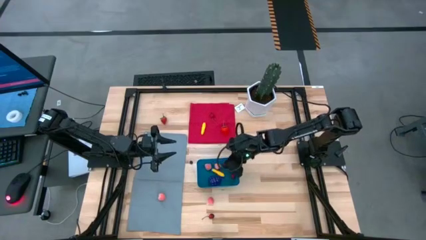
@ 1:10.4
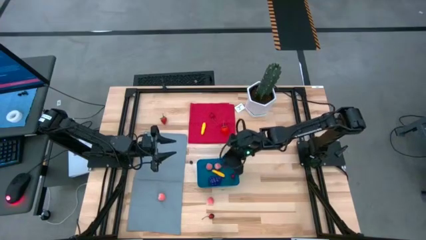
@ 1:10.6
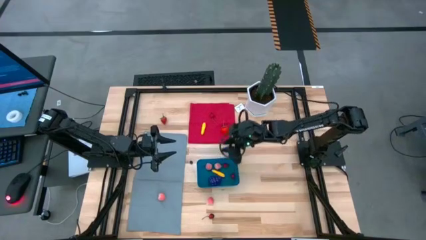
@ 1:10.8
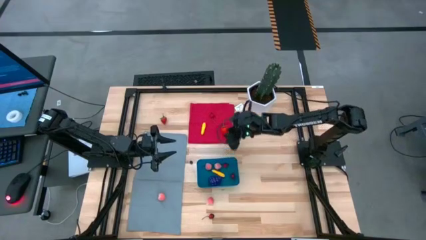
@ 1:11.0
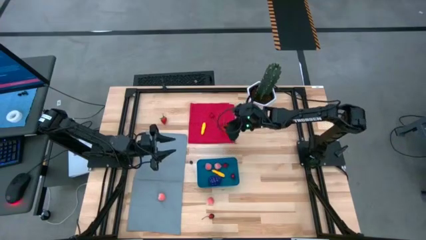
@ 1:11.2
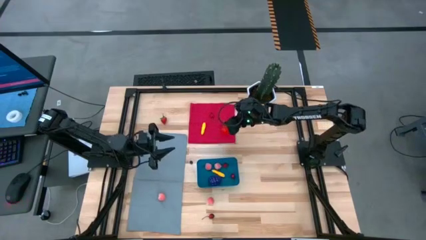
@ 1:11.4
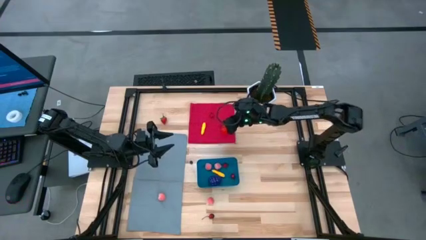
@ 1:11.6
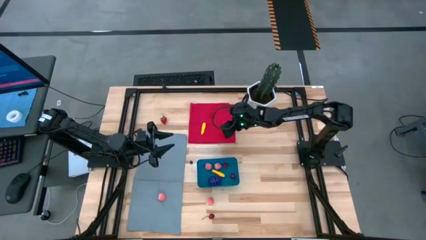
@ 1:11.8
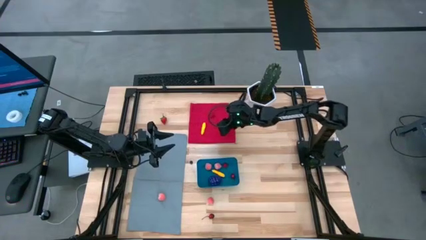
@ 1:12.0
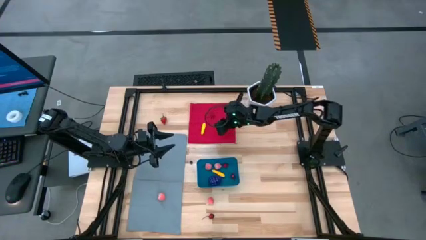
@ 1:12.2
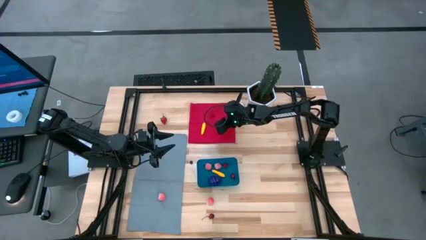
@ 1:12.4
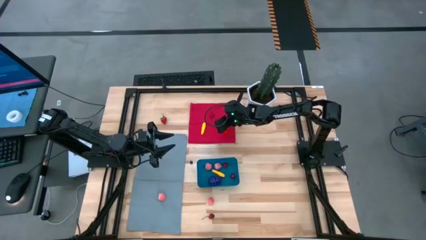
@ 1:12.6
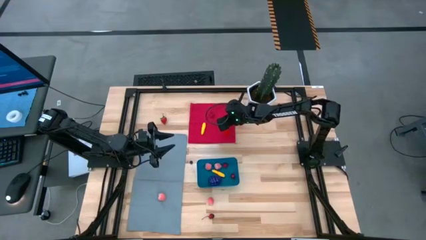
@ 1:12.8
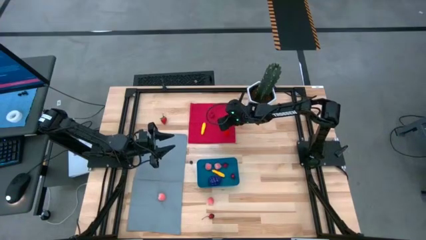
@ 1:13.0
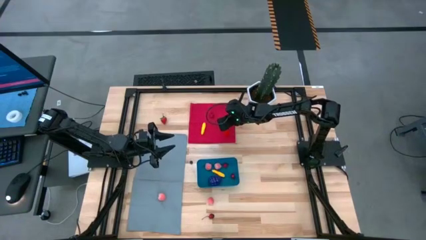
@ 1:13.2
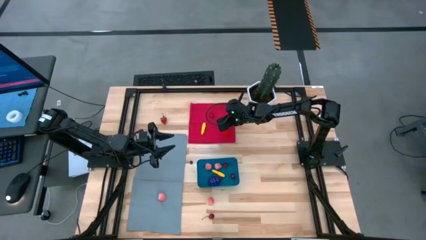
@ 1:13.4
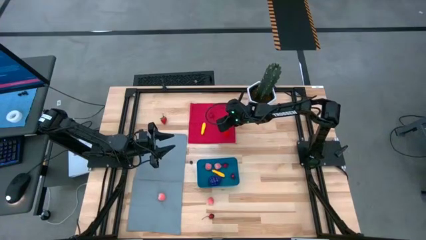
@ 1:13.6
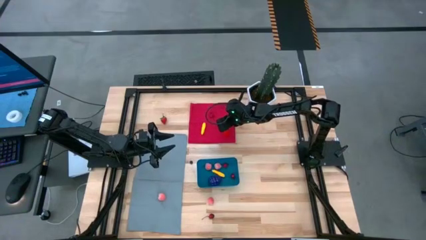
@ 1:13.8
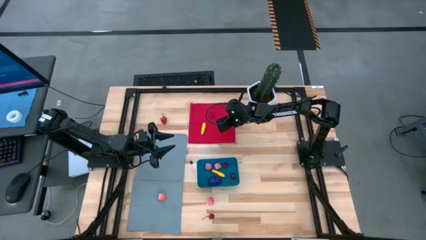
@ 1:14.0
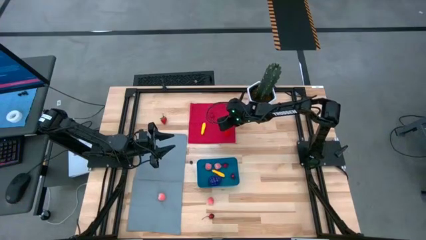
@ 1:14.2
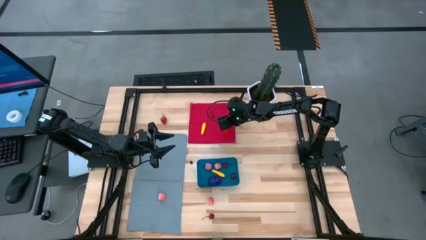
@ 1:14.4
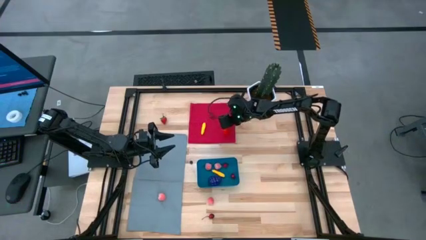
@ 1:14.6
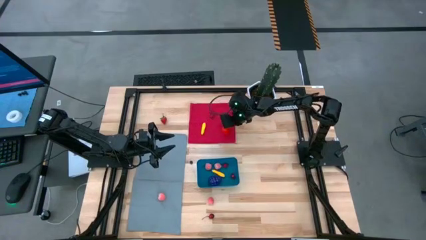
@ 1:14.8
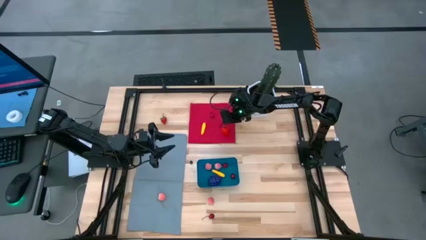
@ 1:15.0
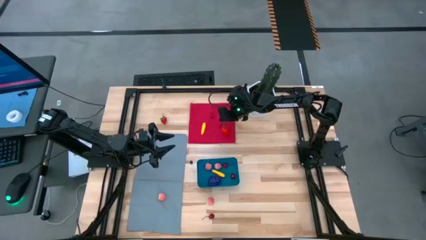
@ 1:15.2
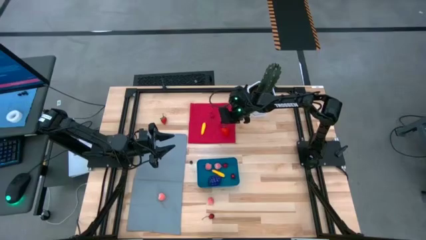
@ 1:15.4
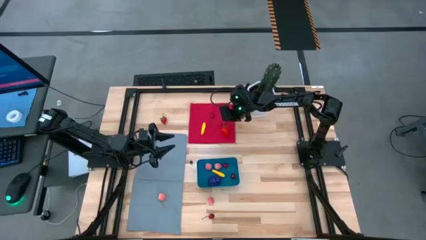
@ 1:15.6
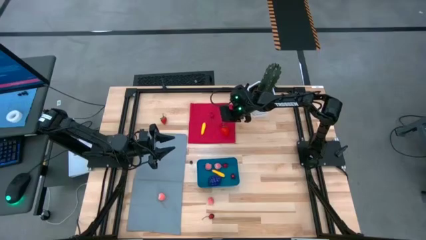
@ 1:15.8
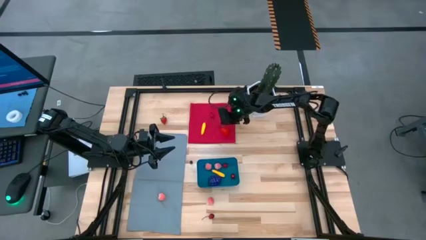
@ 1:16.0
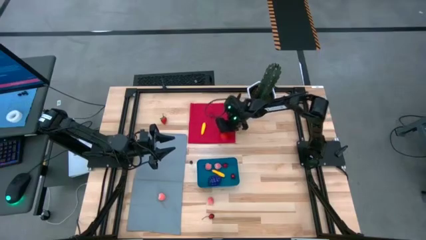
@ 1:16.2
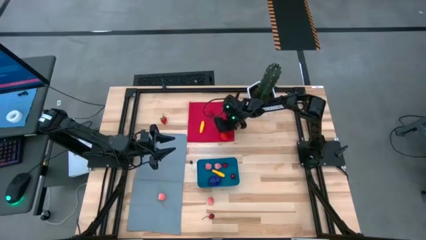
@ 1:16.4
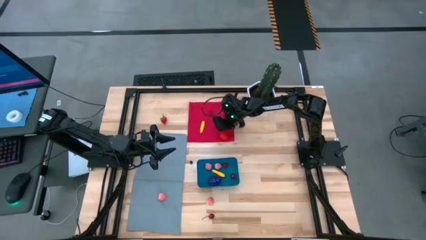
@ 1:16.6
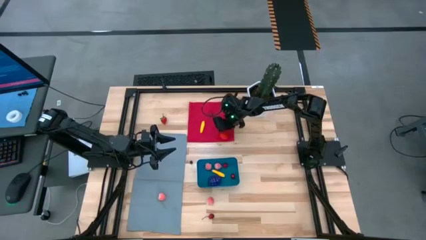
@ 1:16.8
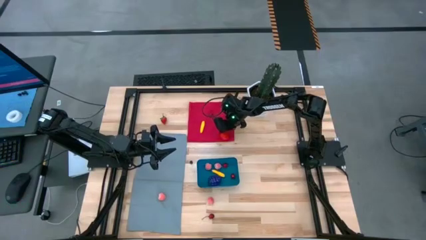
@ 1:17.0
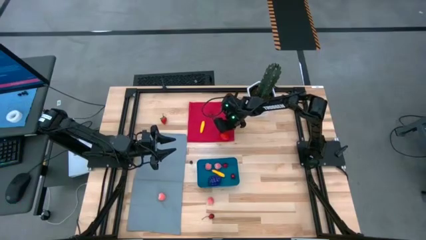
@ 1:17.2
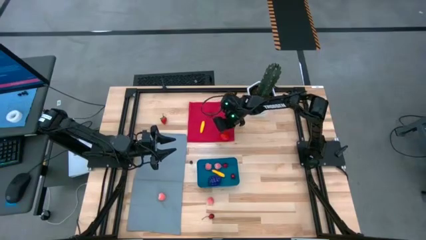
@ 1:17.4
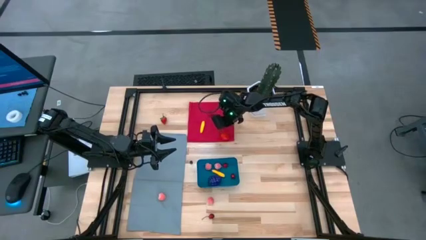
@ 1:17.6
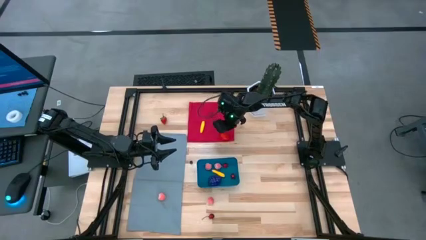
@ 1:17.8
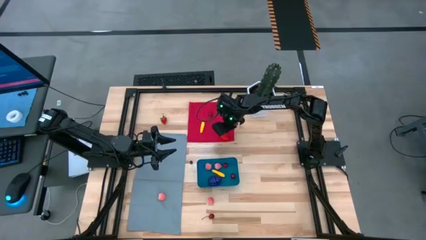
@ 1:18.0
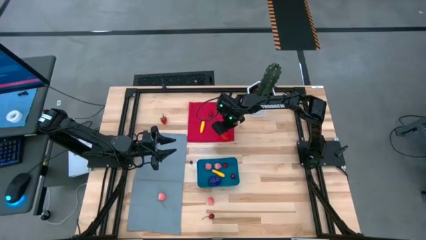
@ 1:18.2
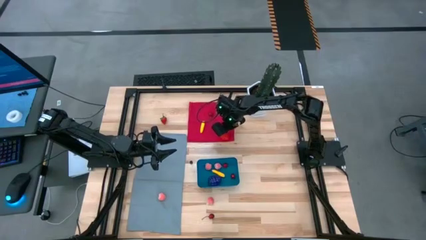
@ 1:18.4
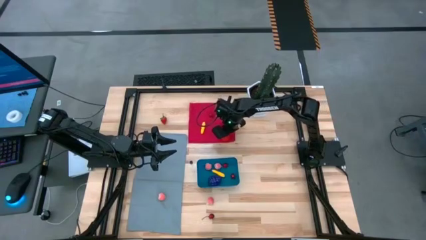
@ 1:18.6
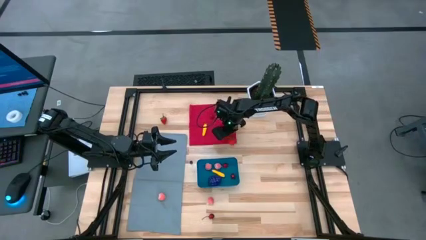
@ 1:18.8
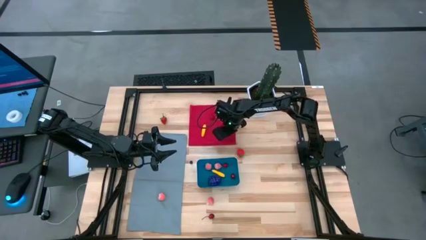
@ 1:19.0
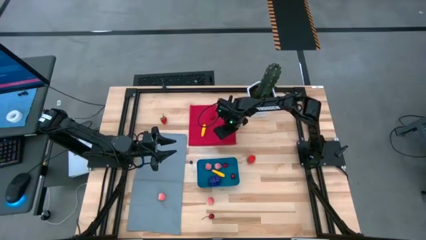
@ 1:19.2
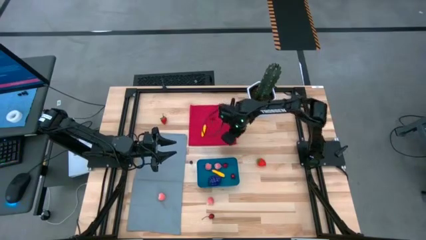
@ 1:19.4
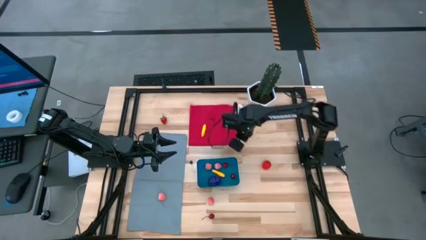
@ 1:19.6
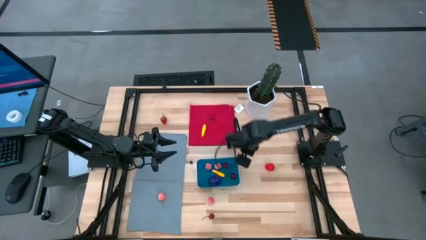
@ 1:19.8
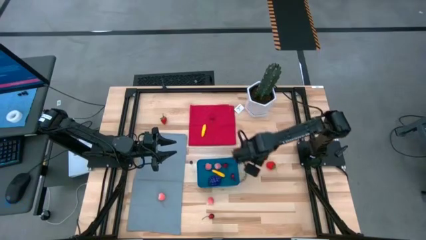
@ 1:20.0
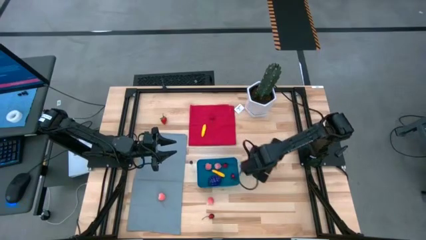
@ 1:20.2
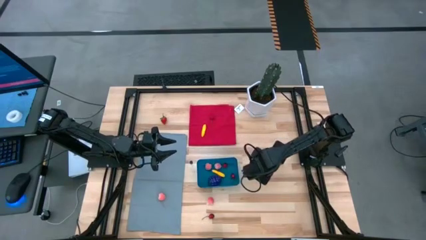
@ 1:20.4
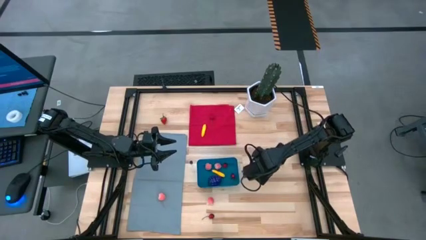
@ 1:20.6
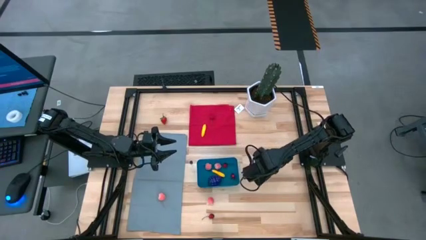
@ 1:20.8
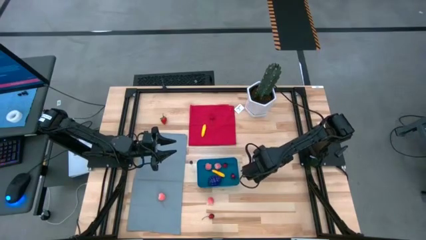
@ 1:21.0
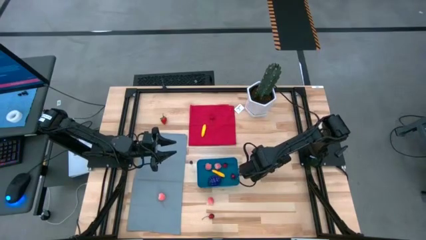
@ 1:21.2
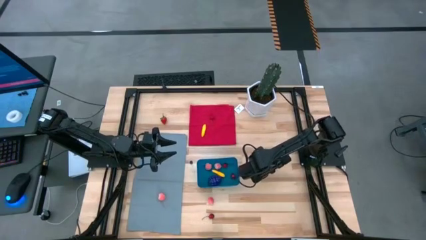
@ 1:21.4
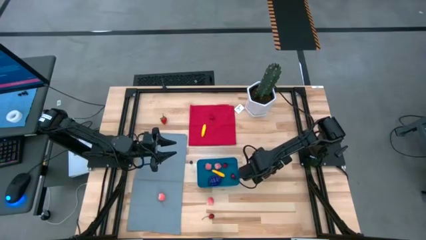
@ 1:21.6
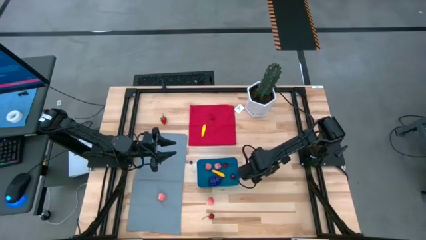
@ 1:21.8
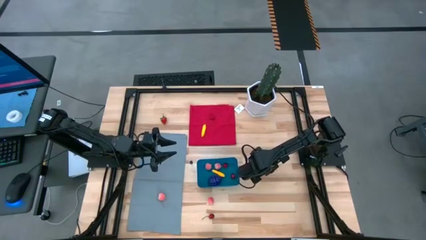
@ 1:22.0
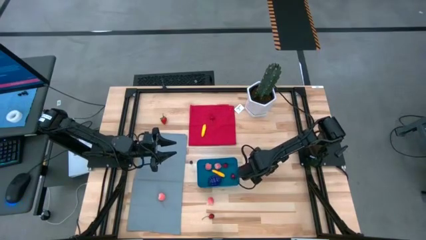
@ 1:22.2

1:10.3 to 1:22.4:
Task: Pick and placing Produce into tupperware
Put the strawberry into the blue bin

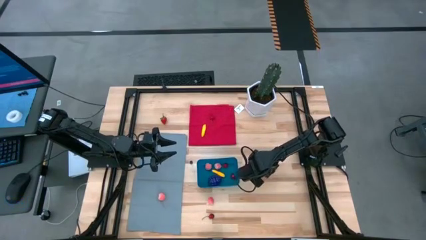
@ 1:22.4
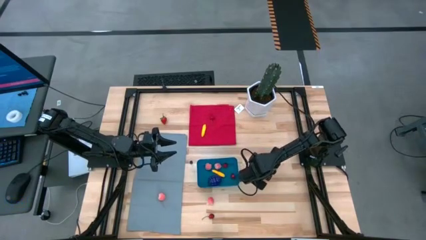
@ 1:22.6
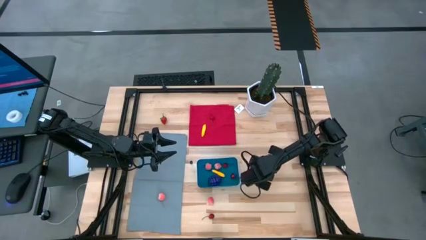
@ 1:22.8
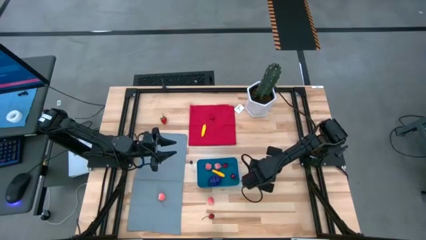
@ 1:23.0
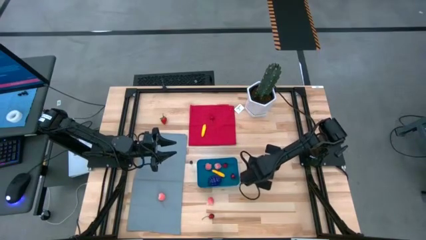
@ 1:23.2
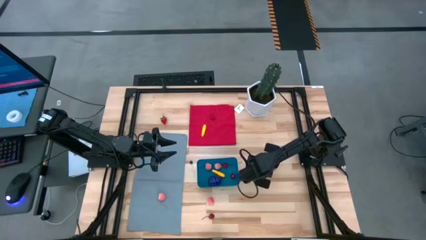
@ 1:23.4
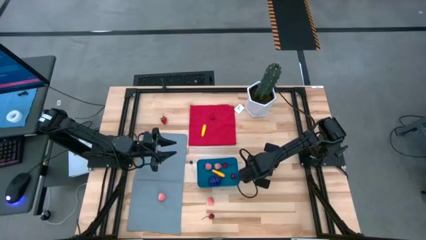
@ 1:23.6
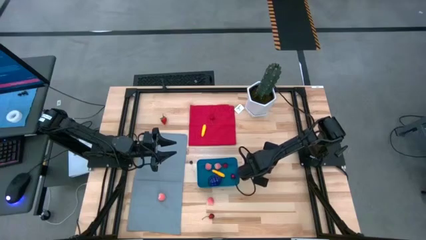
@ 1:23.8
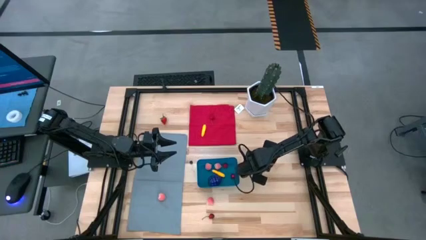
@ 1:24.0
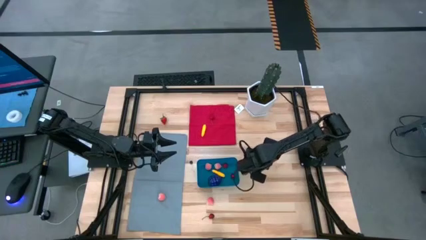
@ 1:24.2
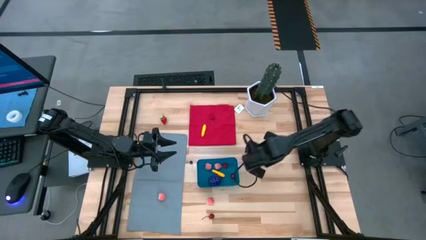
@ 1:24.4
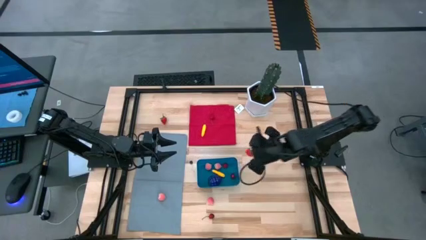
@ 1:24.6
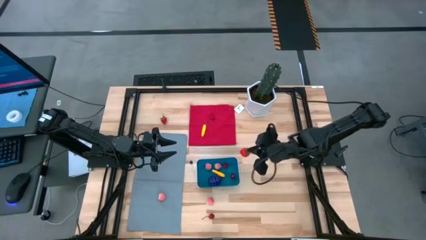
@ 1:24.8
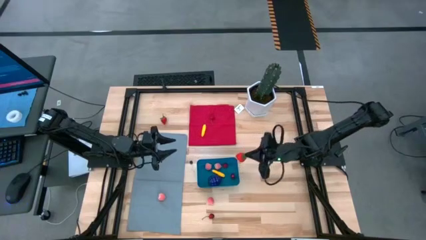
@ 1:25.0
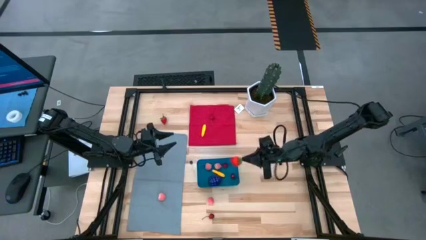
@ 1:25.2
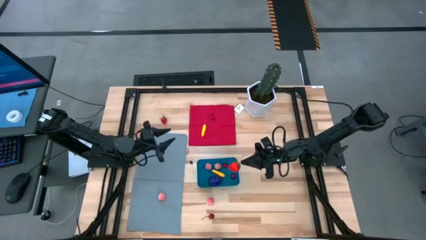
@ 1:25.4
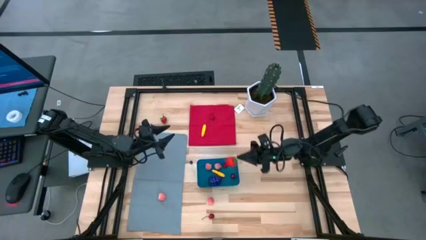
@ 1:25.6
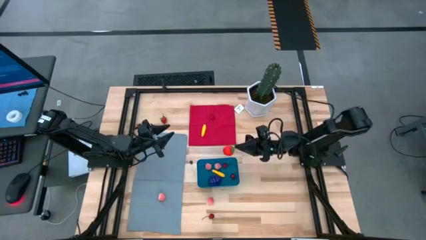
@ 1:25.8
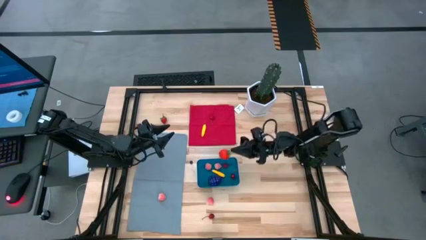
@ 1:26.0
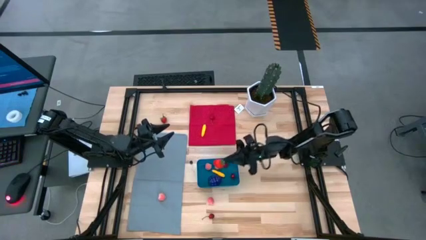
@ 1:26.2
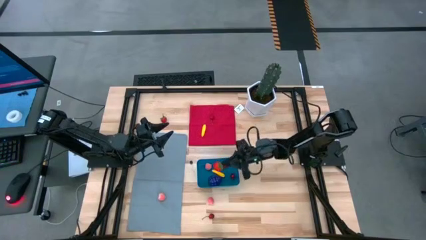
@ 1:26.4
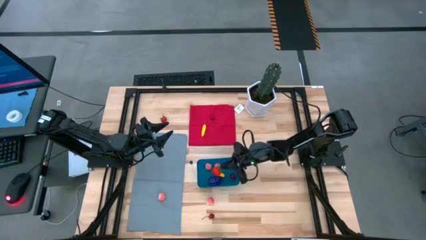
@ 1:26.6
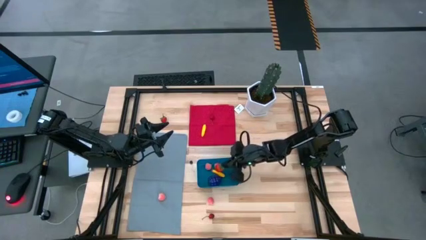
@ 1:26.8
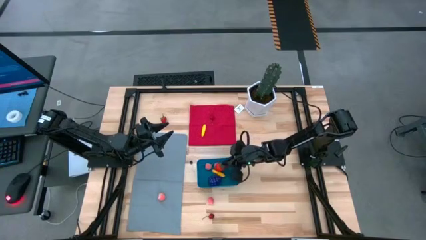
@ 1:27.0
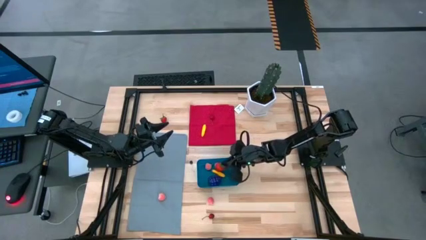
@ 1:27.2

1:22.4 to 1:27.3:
Put the strawberry into the blue bin
